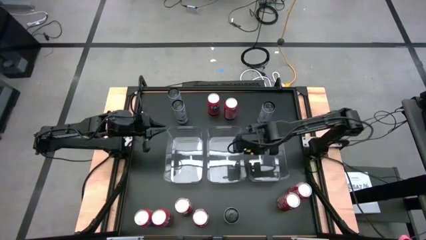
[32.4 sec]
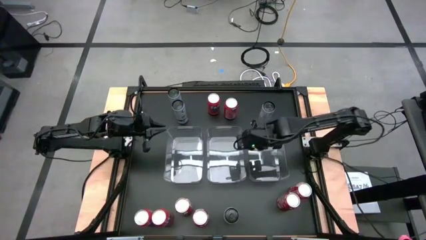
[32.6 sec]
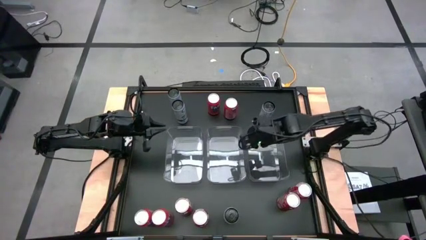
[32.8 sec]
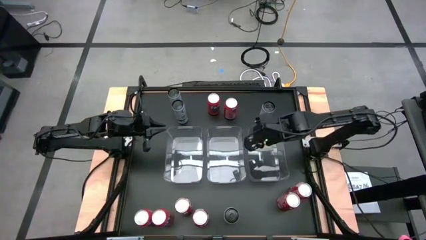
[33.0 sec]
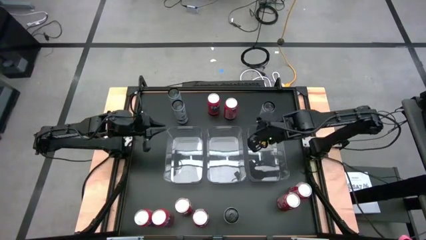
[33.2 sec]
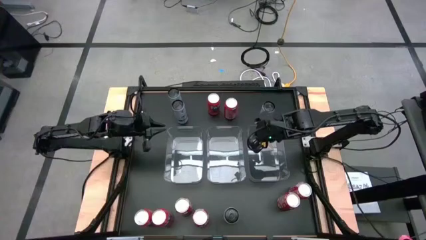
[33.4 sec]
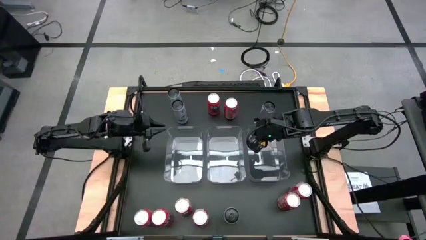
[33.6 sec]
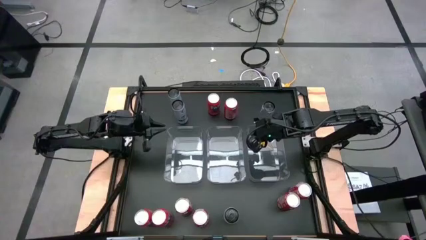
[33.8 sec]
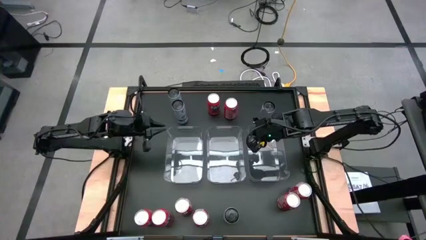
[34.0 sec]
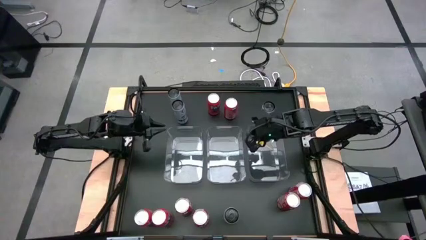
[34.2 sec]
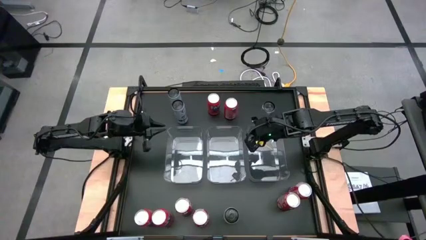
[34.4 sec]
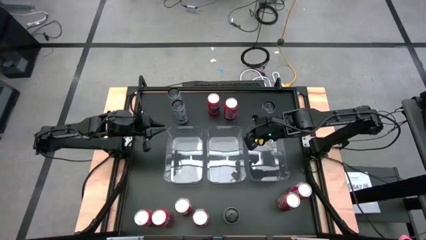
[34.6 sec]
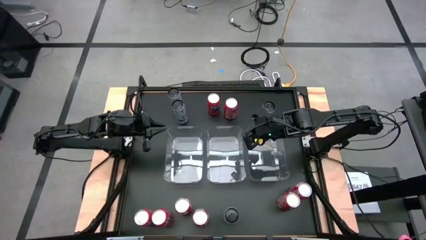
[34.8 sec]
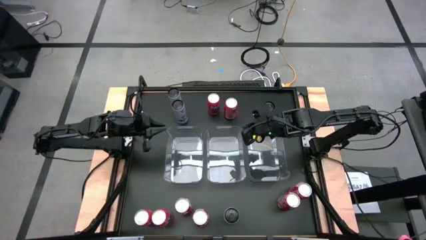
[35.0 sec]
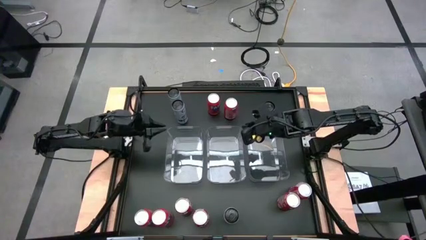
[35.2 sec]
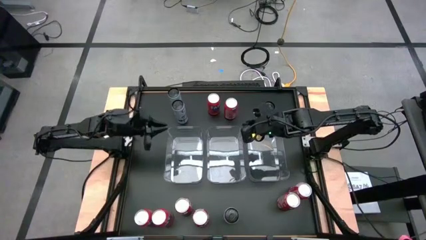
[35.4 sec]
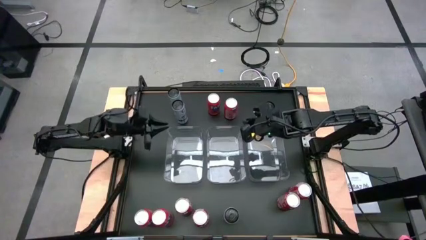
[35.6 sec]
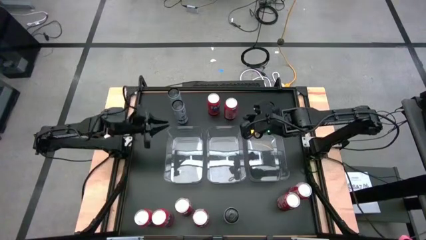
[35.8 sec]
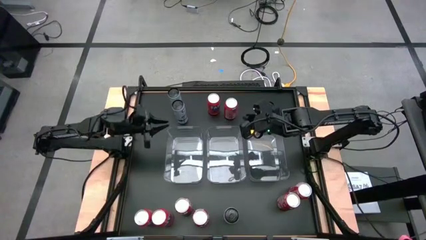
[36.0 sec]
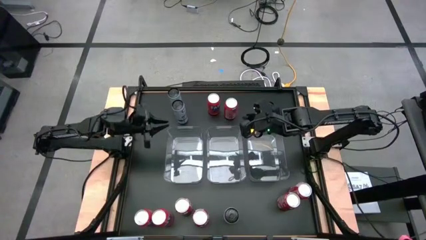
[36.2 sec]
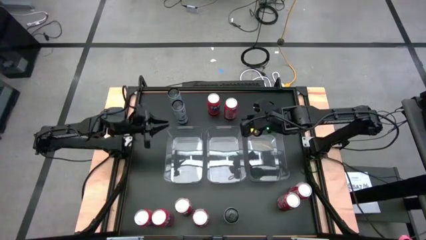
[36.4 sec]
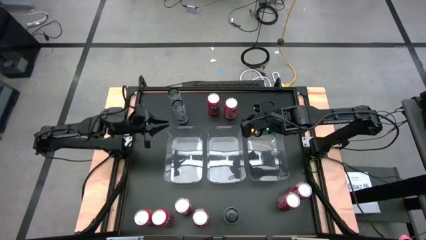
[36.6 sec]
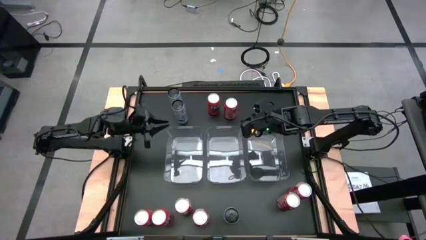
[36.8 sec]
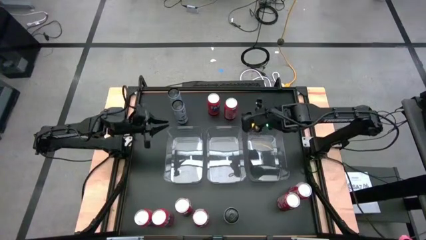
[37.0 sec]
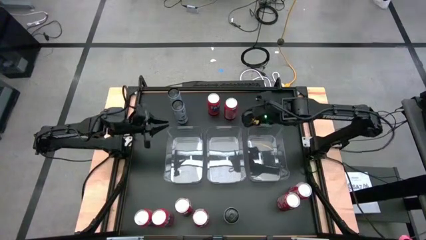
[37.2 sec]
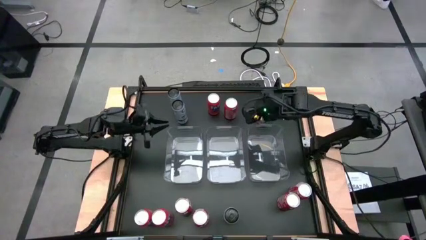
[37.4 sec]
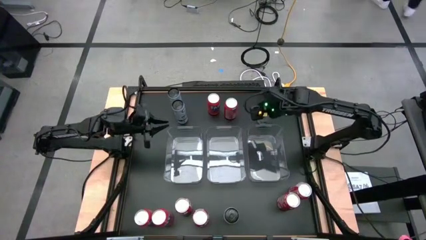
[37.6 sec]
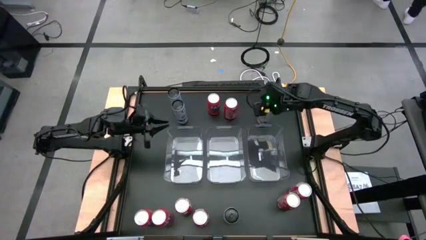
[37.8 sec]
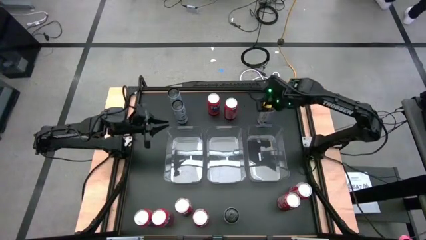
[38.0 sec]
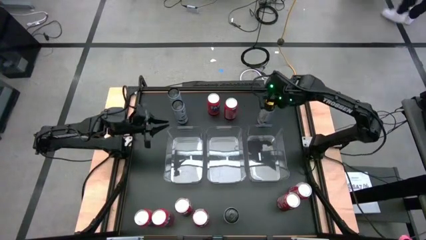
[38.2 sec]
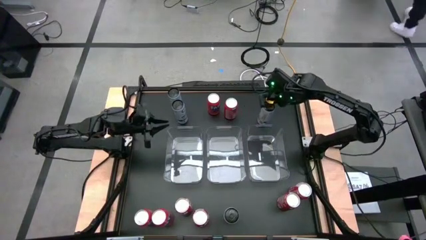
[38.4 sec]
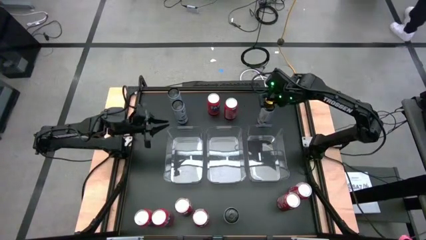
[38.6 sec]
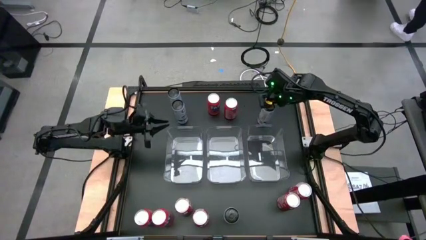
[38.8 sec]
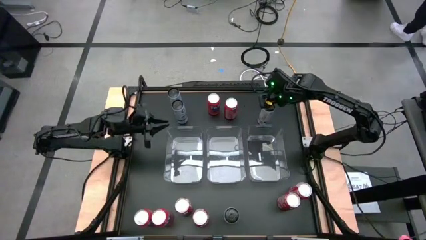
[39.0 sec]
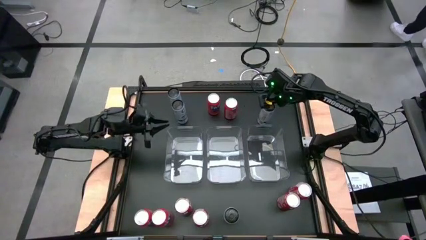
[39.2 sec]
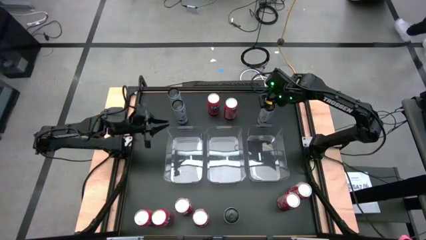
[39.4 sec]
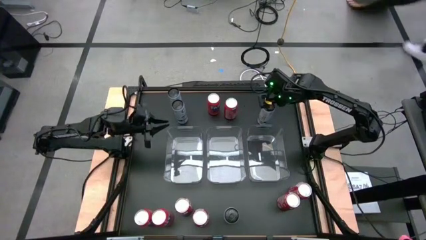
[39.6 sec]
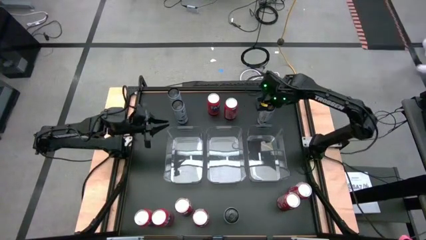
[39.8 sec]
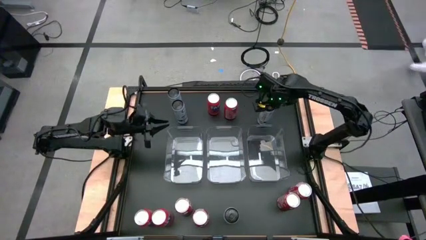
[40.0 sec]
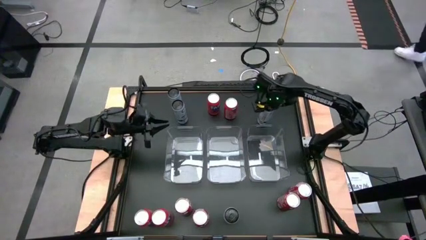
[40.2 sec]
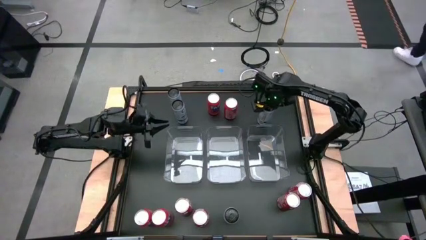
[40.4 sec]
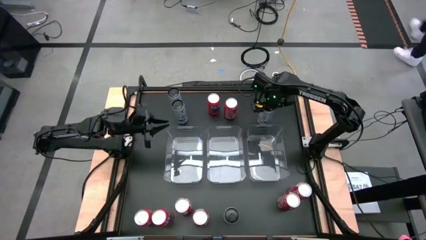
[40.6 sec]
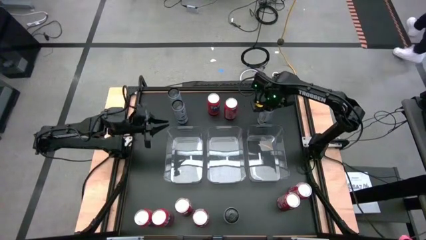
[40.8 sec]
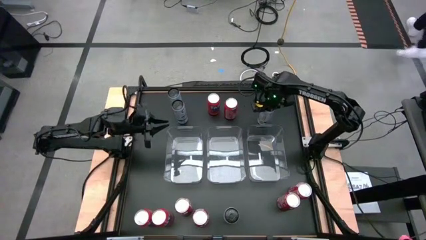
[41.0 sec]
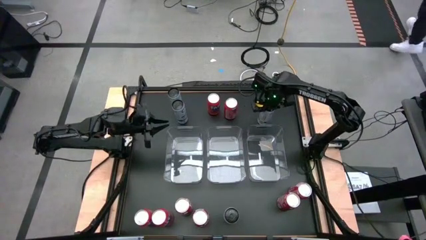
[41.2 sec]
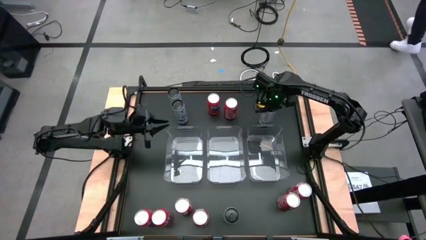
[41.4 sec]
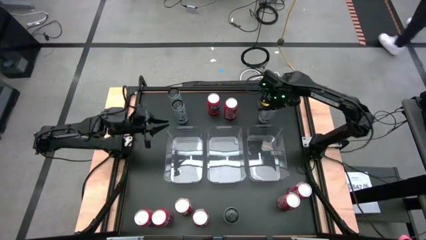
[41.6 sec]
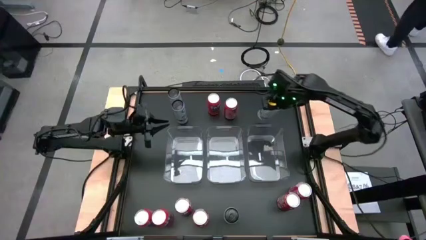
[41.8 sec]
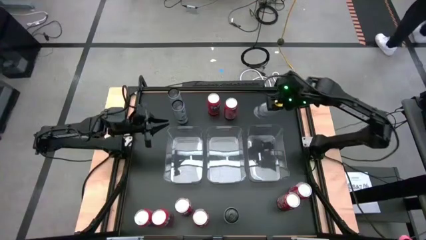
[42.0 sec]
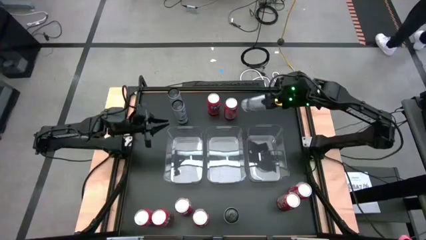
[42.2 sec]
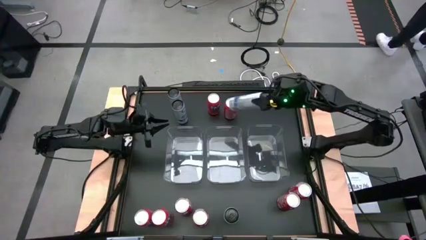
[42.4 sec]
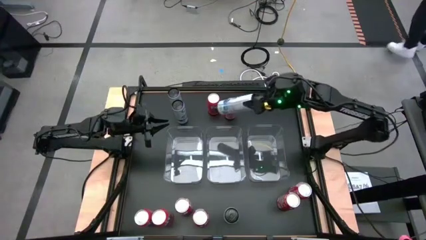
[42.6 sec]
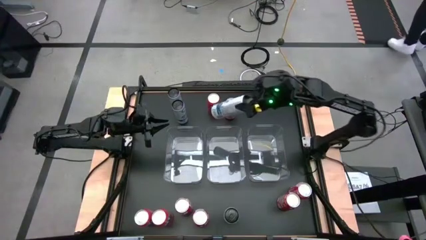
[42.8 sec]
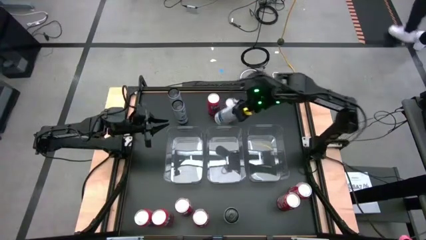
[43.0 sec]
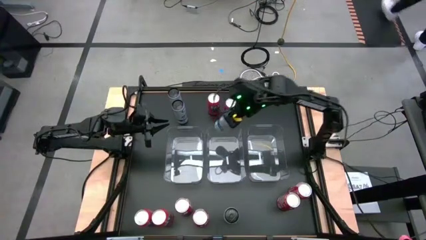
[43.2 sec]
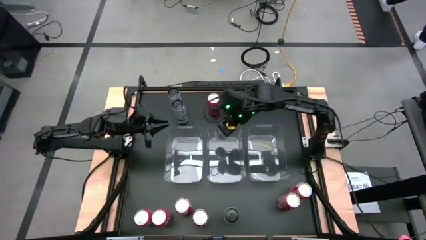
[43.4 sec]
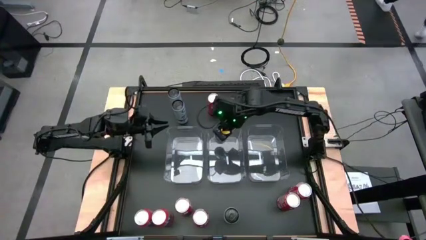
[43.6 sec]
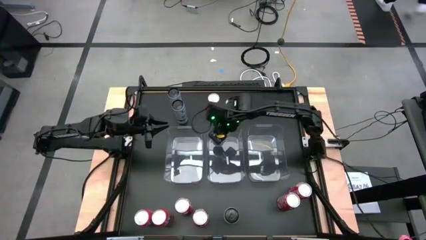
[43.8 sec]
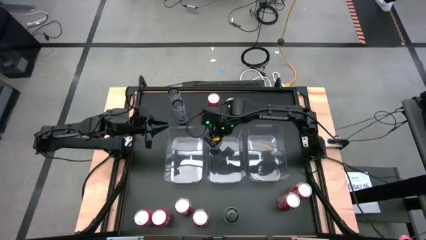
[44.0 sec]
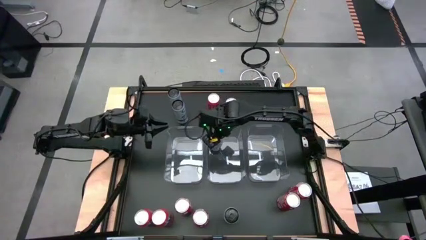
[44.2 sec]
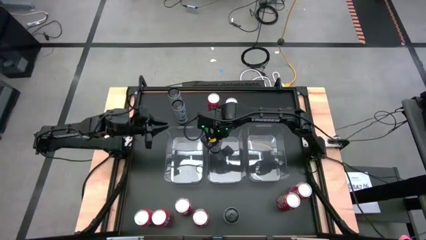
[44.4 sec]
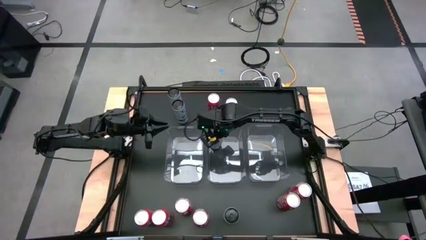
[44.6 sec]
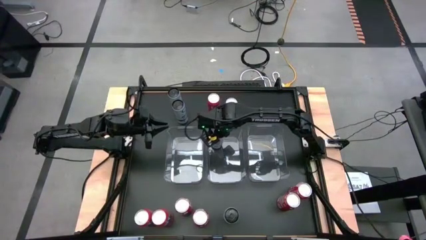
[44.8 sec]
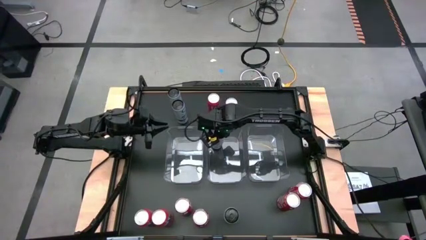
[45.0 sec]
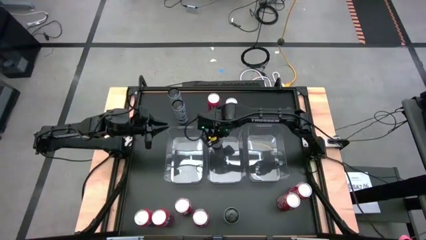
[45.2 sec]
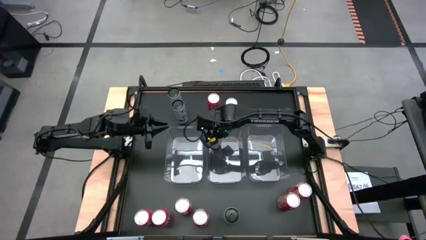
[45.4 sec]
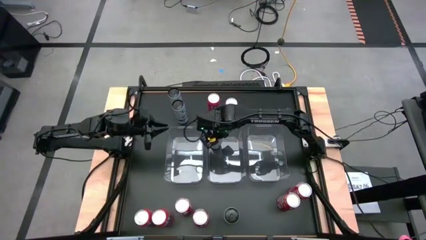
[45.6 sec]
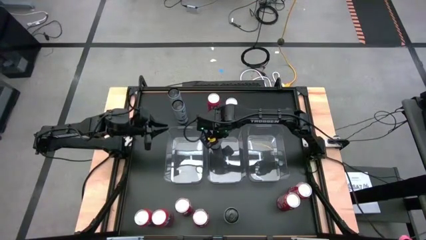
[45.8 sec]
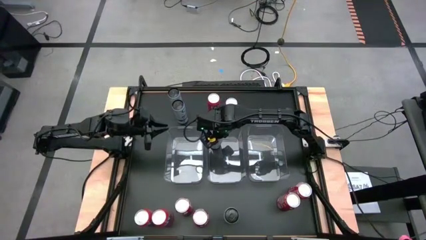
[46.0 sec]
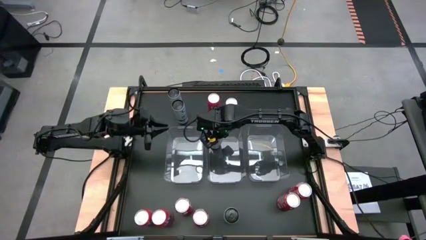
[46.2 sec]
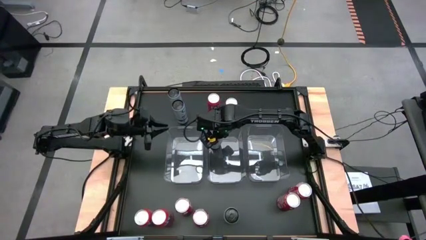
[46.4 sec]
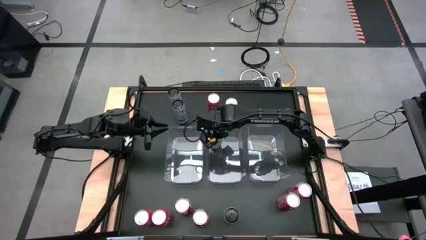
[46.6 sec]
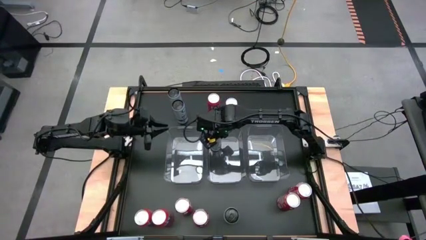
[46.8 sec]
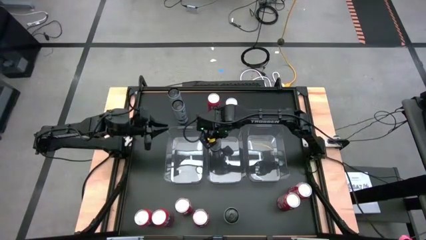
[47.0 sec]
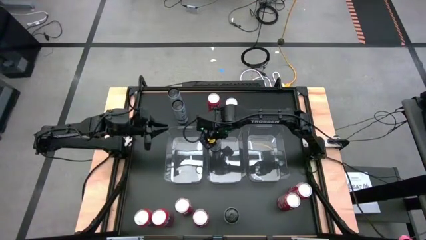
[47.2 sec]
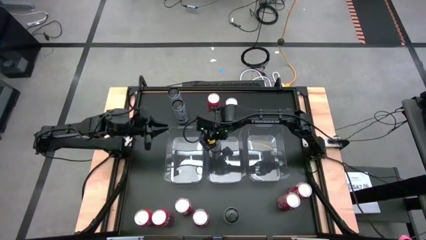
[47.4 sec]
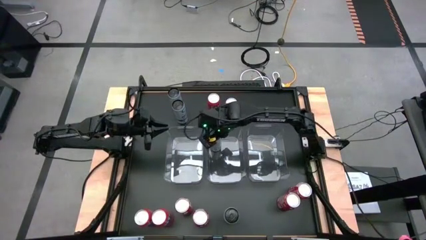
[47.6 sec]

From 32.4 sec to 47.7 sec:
Task: Sort soda cans
Put the top right white soda can into the center transparent bin
